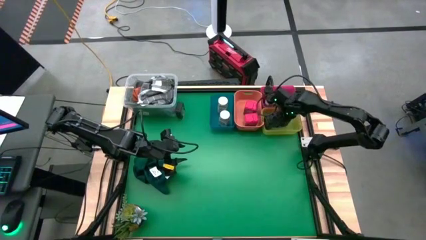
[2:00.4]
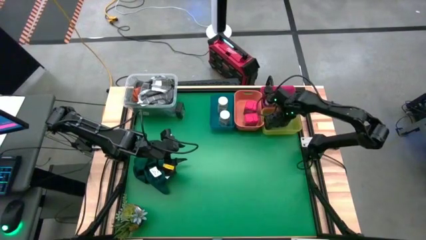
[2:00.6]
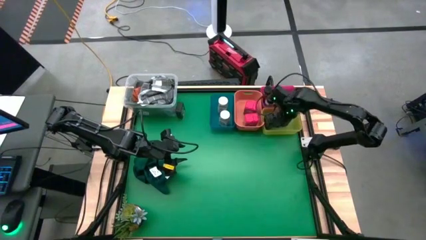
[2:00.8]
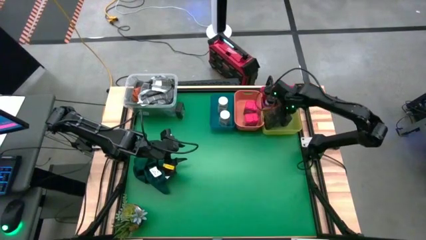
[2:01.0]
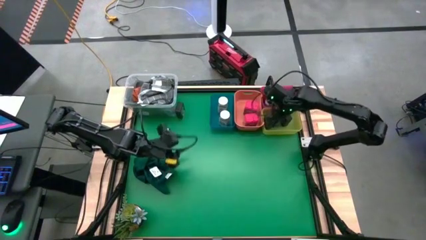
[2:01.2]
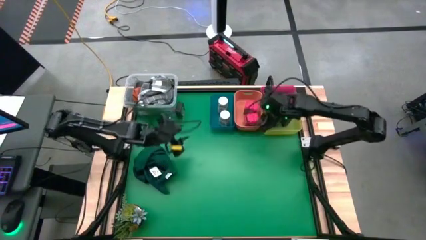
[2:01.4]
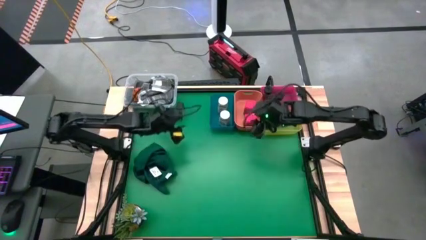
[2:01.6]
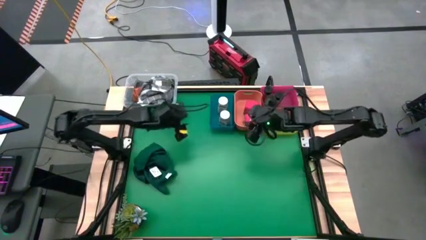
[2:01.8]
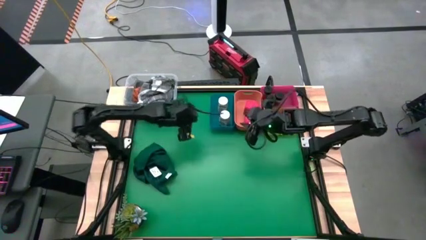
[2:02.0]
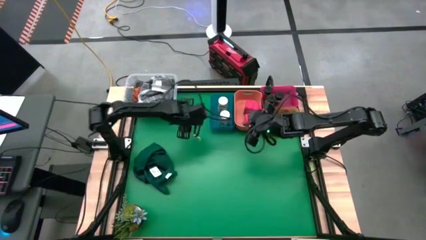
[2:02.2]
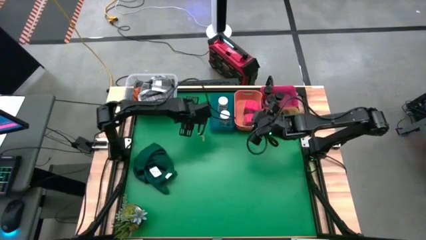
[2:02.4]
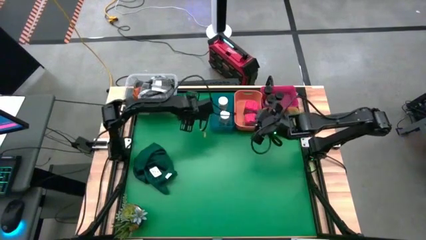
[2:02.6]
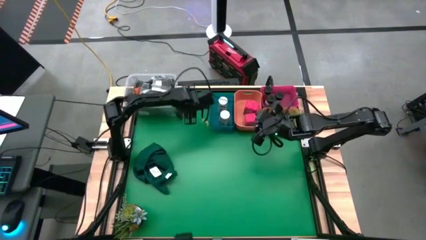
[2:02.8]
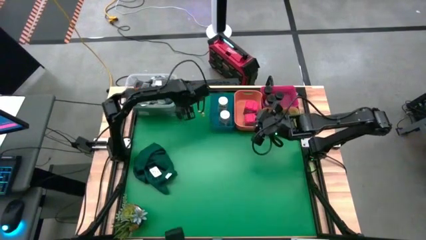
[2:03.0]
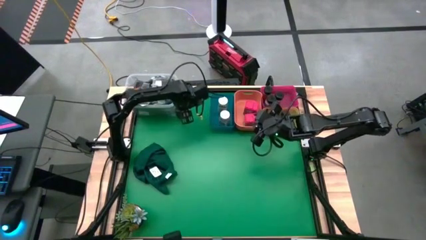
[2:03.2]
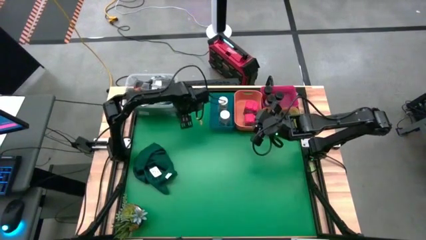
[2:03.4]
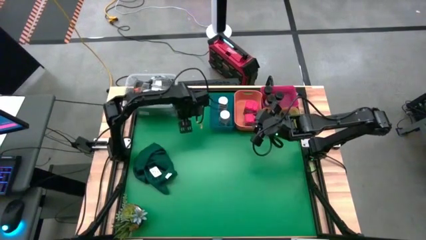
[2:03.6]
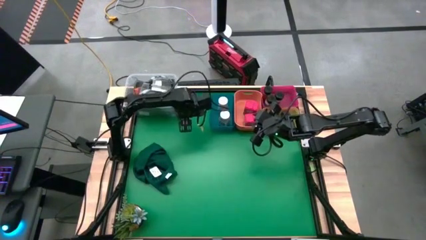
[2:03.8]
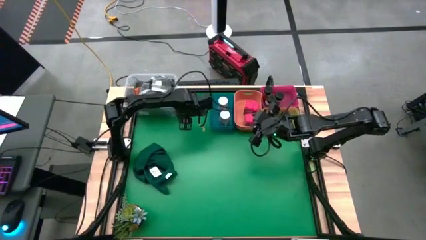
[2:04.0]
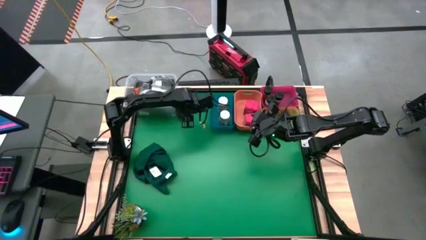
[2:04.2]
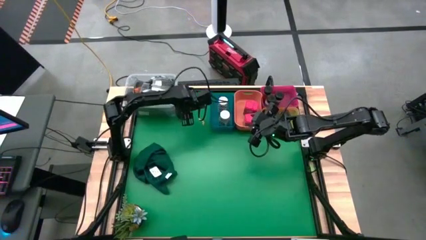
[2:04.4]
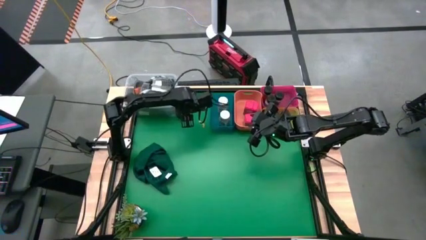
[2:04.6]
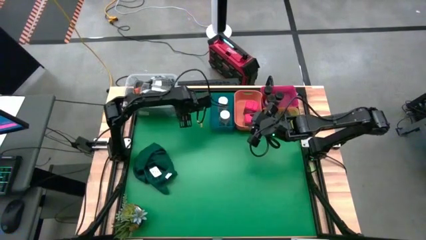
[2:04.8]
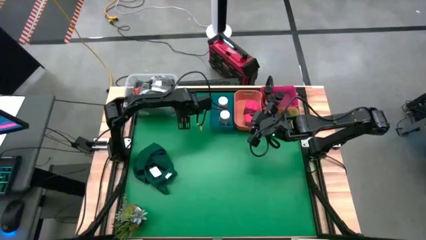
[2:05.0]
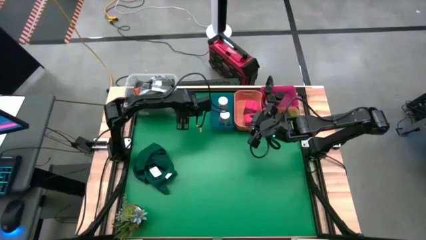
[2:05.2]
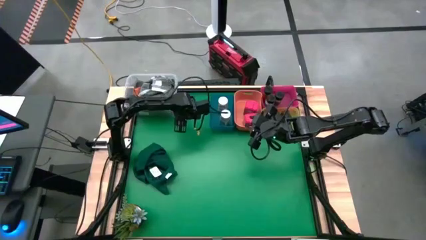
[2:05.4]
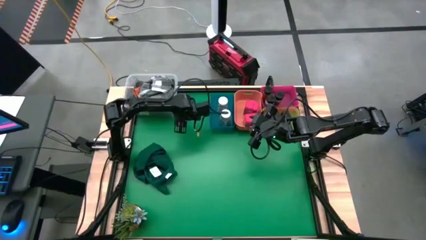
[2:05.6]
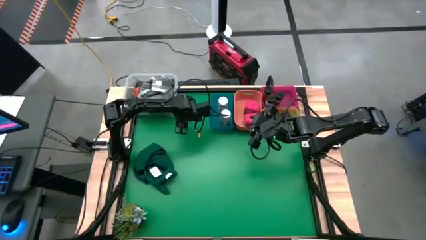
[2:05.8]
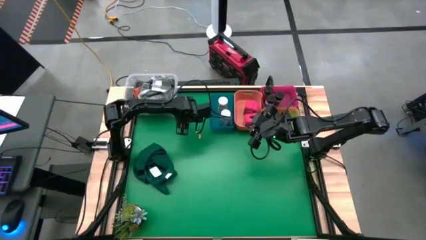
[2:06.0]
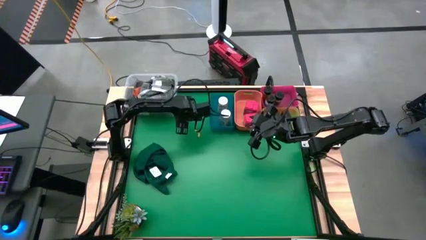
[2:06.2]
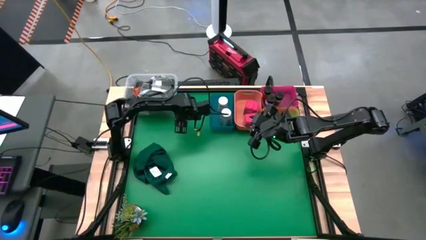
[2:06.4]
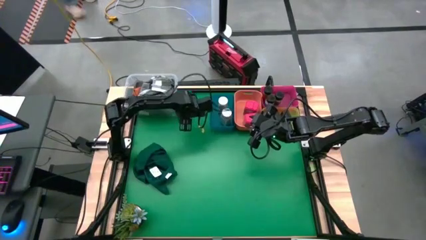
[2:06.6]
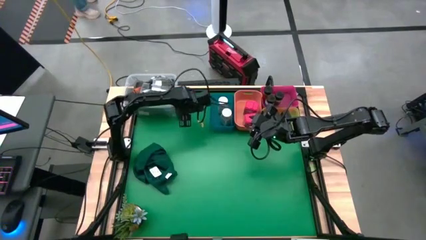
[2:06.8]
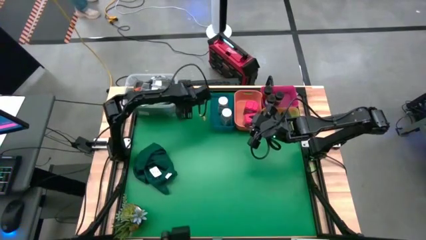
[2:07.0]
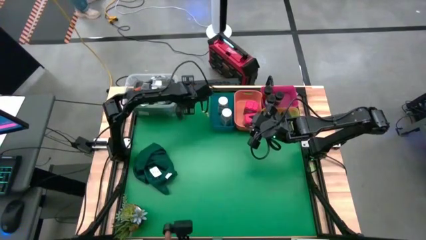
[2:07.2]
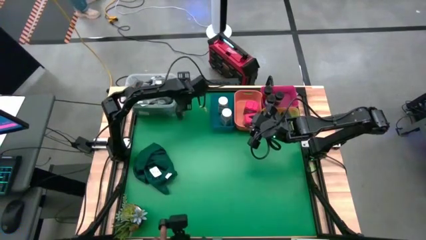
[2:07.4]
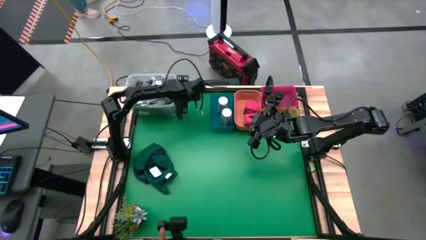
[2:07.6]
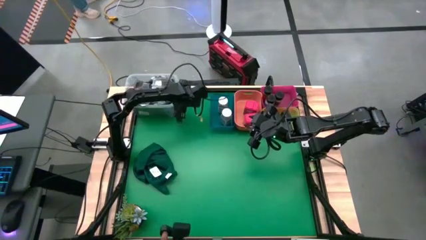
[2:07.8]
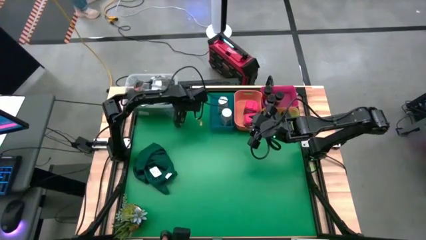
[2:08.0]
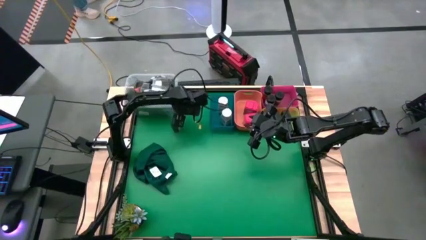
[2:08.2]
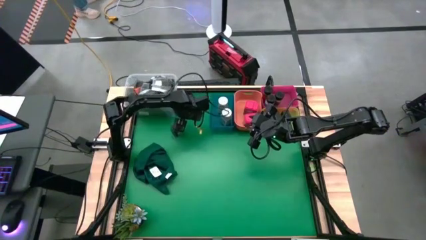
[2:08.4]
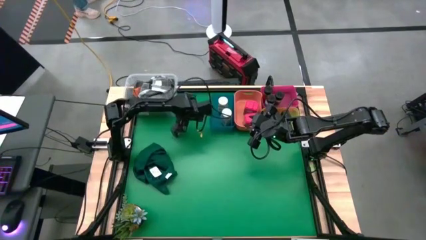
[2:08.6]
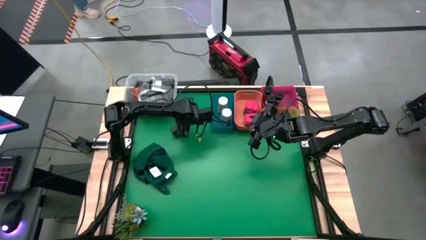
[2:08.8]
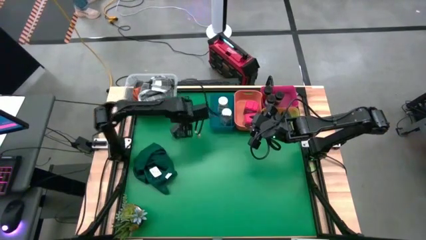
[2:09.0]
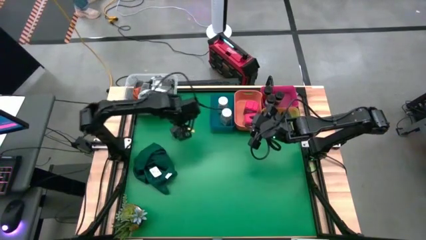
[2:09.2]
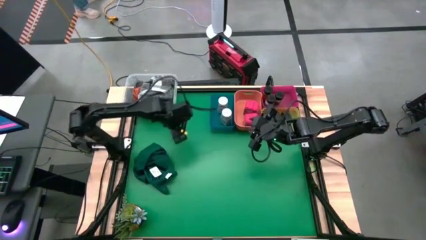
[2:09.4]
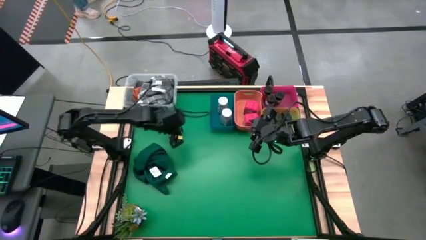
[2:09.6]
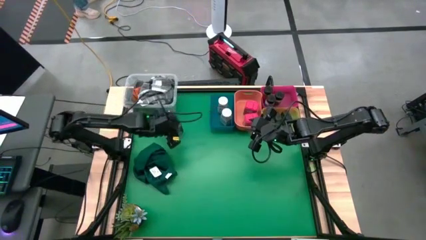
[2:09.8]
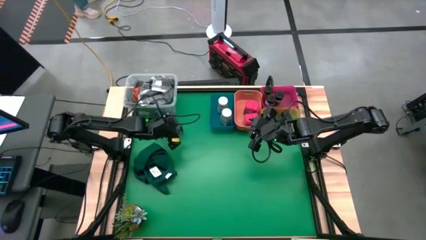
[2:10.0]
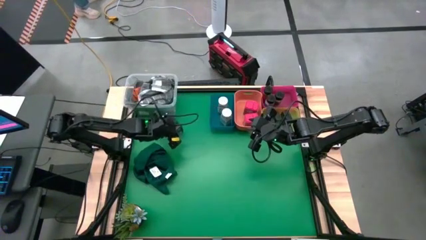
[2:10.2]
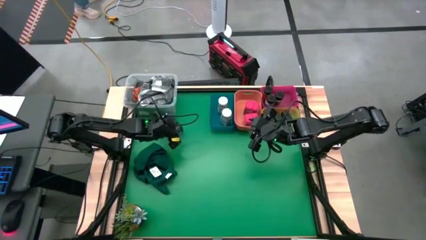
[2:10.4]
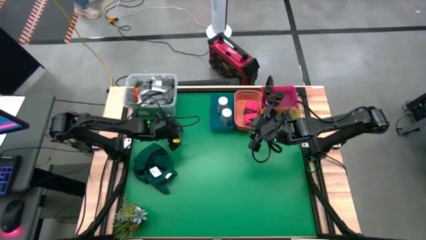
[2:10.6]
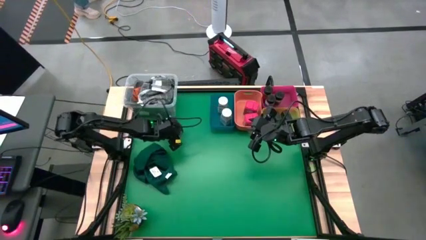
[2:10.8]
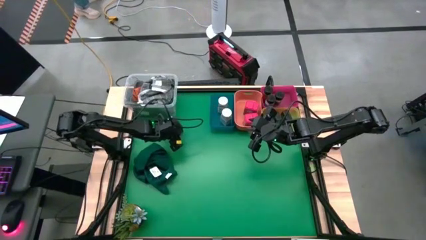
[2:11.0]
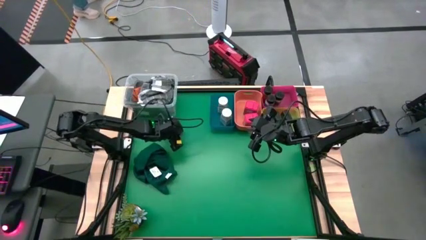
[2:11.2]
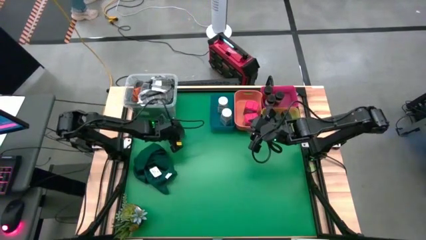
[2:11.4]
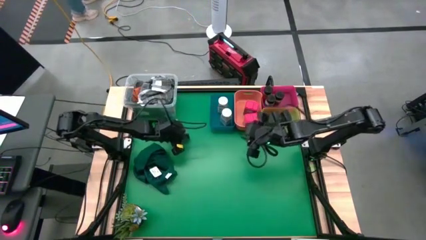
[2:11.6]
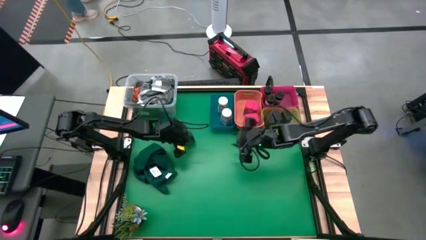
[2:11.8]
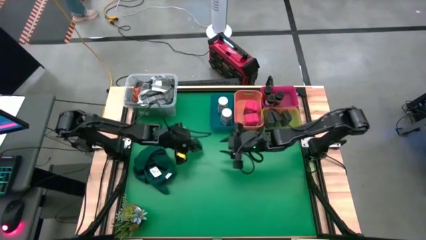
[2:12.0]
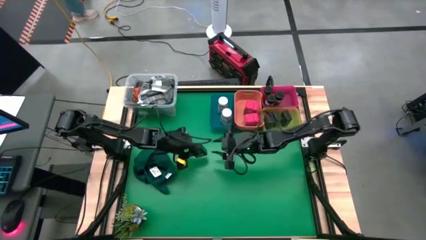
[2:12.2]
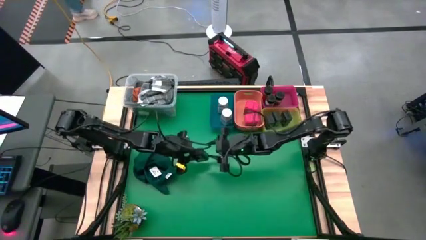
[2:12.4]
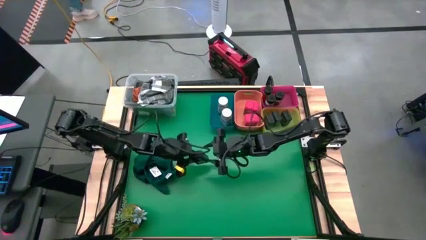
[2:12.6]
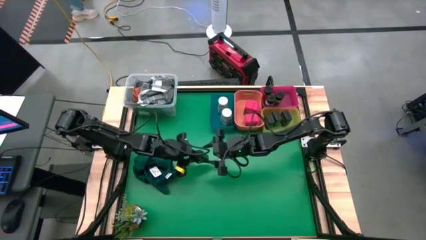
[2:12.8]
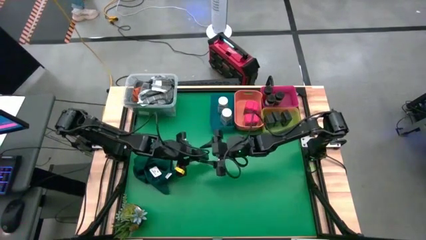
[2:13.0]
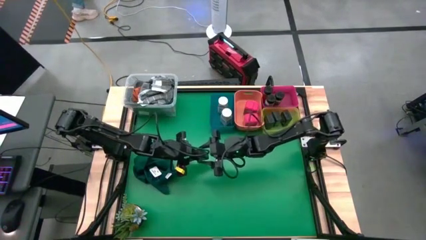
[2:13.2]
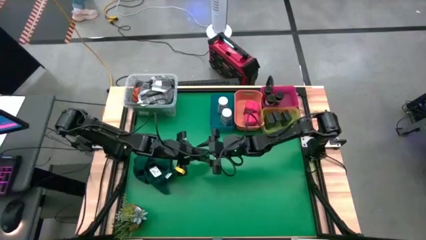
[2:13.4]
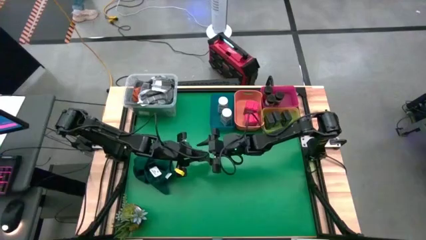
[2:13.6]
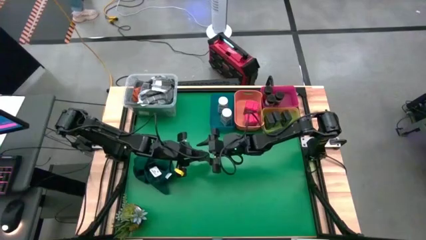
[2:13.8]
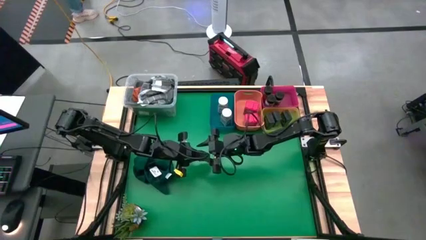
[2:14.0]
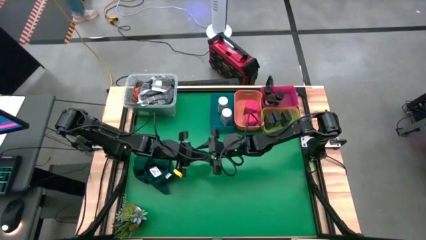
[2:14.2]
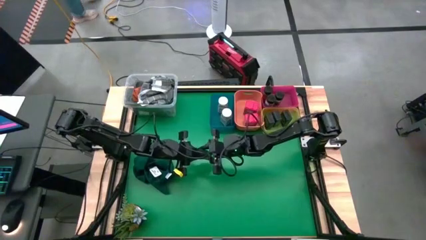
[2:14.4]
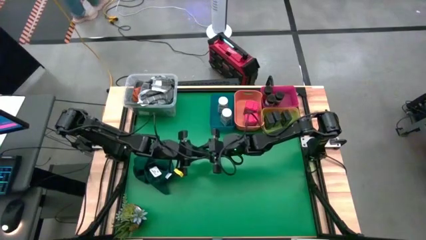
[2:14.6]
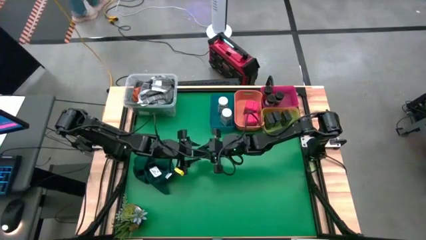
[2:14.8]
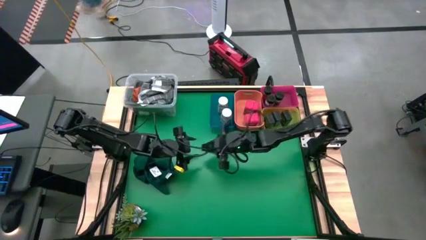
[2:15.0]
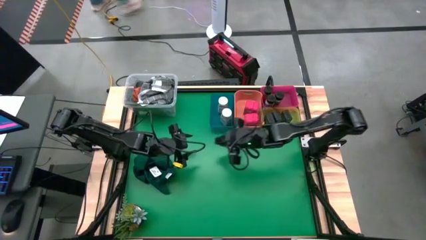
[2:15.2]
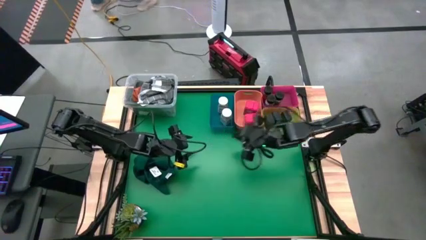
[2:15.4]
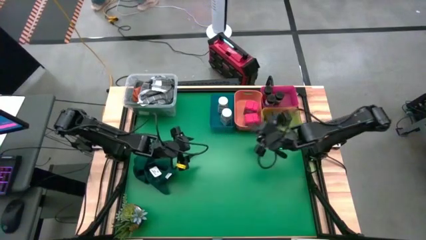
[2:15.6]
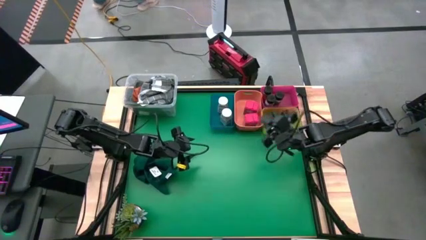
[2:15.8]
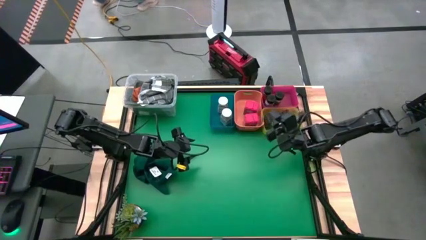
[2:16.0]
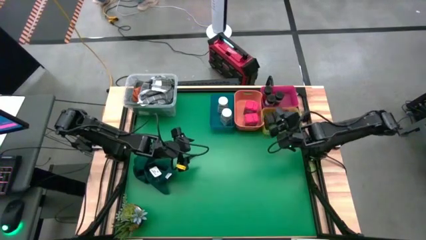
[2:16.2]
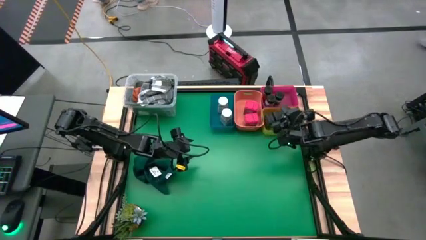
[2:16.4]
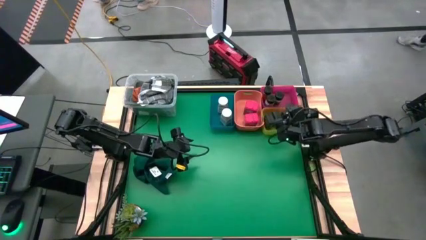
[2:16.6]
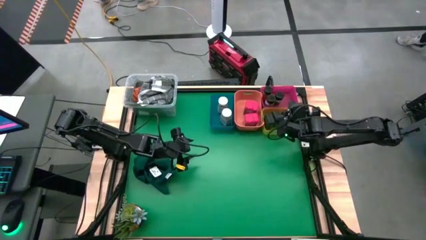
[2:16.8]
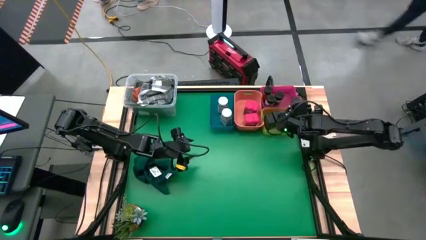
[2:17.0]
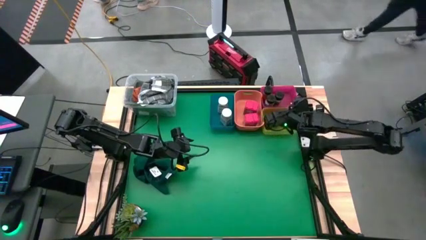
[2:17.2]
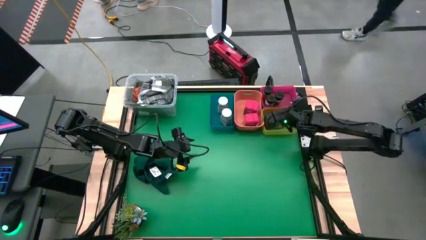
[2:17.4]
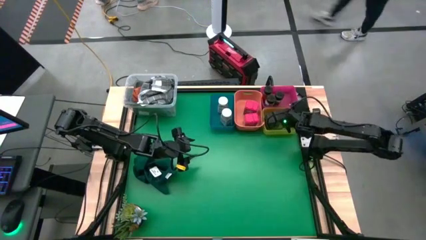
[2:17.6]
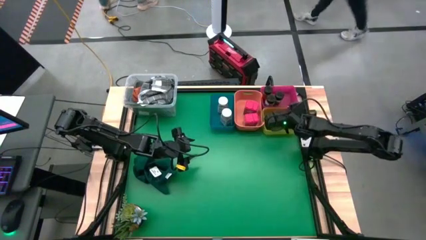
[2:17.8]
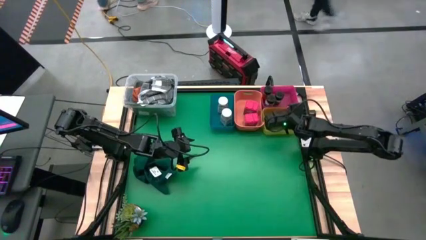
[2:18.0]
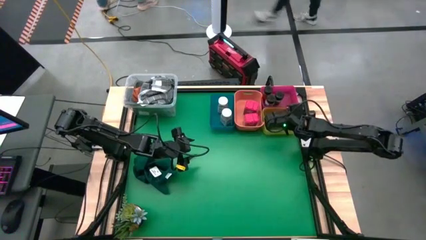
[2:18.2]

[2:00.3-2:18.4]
Task: Sort spices by type
Put the black seasoning can into the yellow bin
